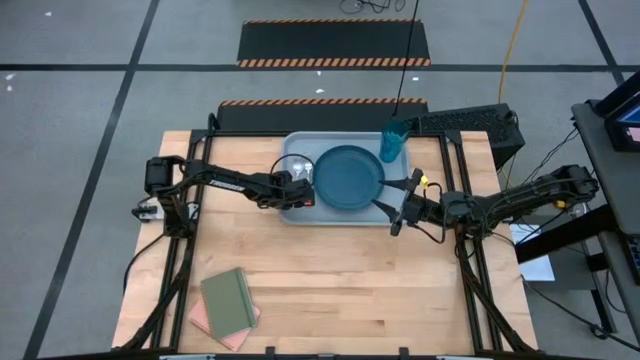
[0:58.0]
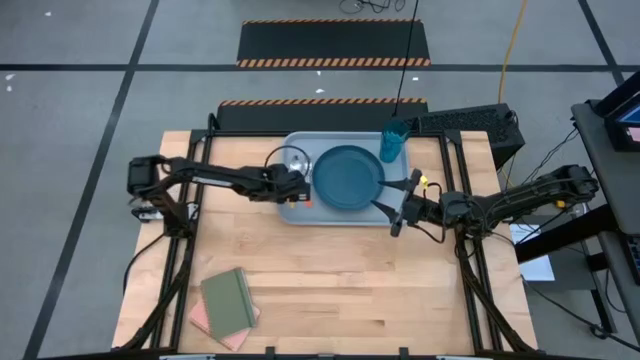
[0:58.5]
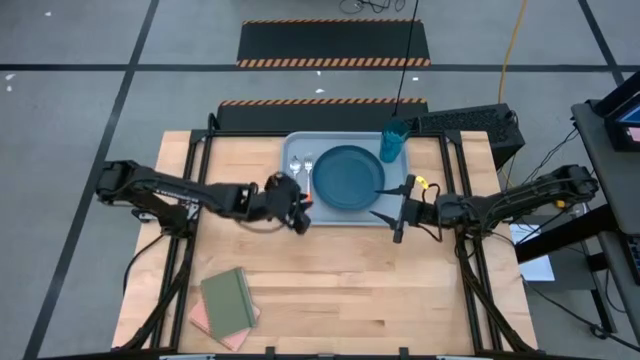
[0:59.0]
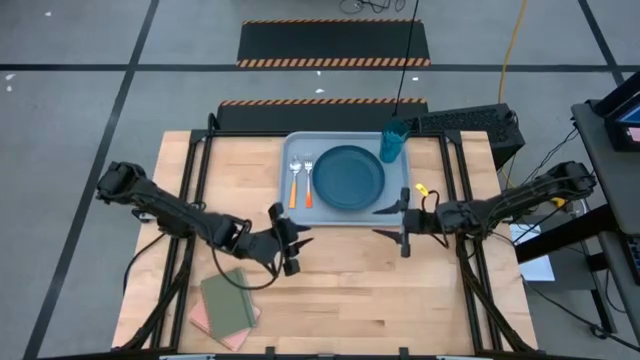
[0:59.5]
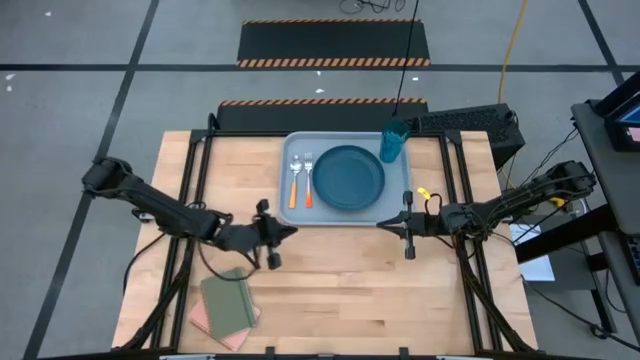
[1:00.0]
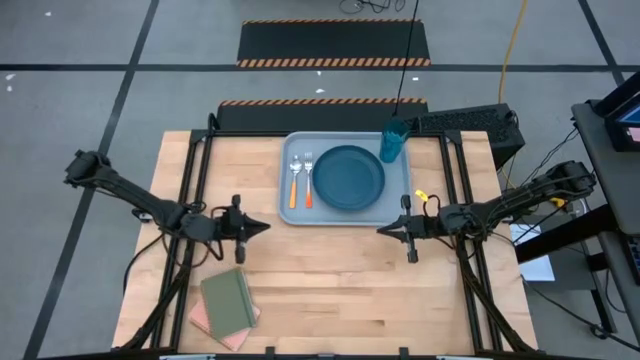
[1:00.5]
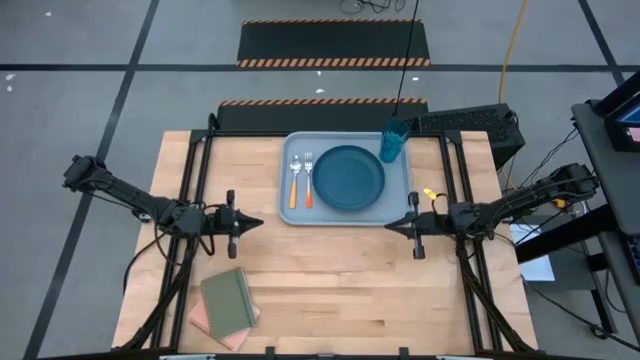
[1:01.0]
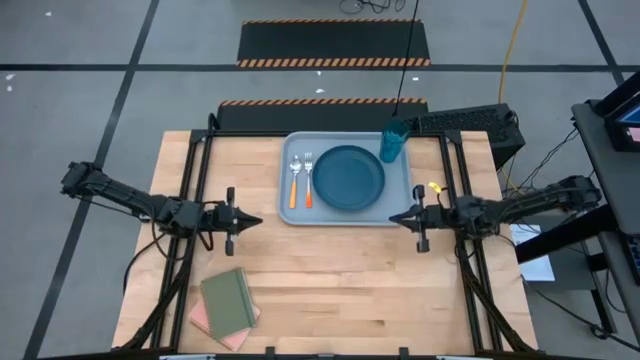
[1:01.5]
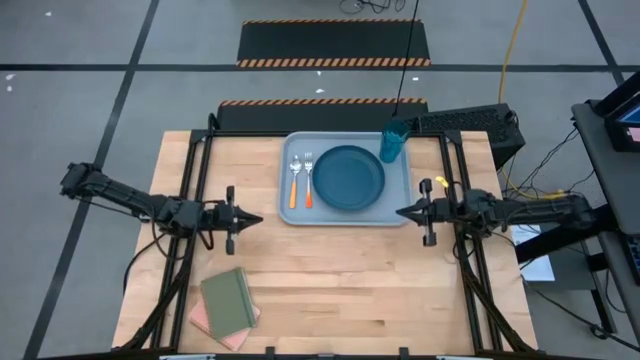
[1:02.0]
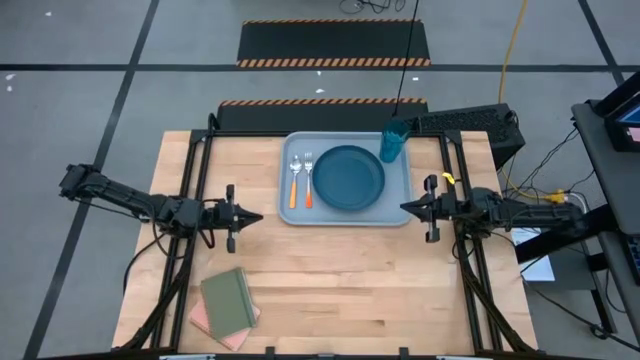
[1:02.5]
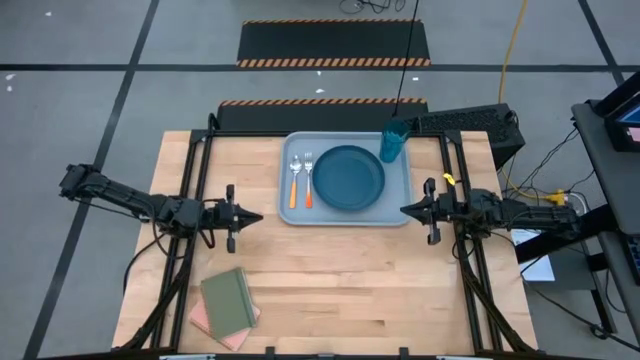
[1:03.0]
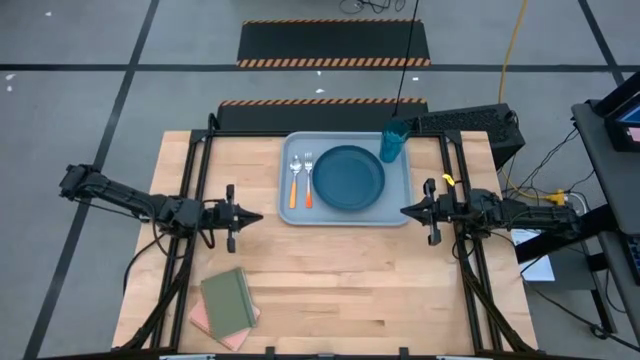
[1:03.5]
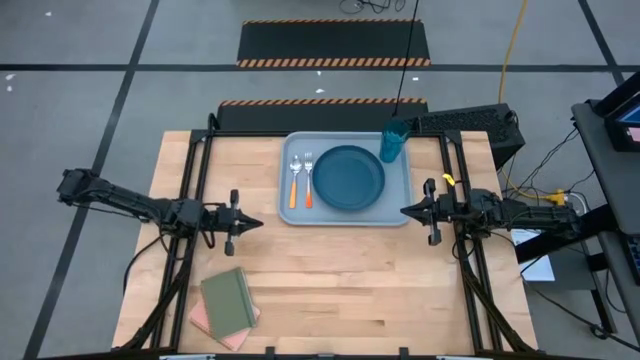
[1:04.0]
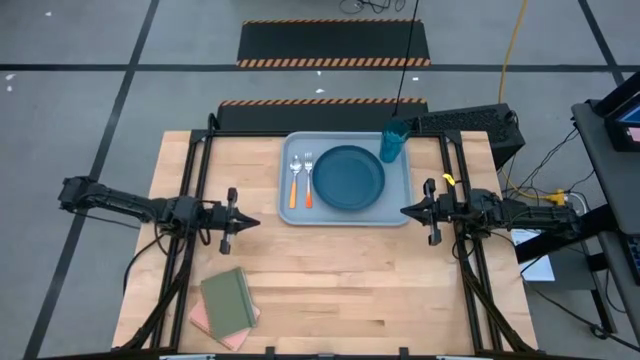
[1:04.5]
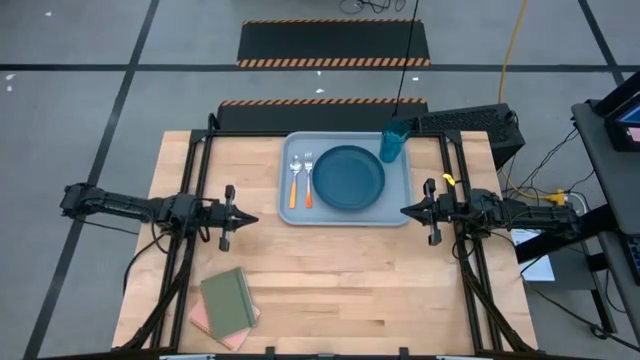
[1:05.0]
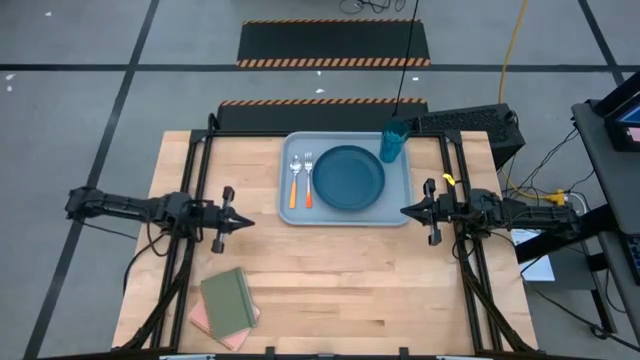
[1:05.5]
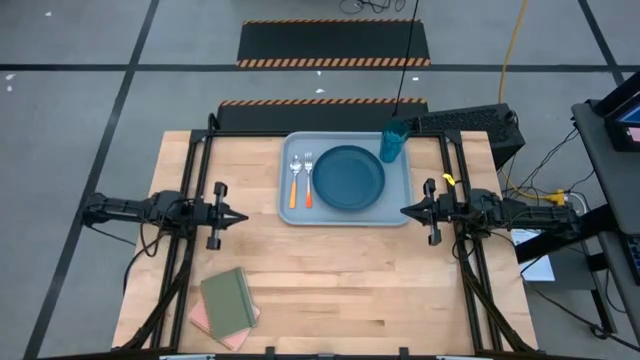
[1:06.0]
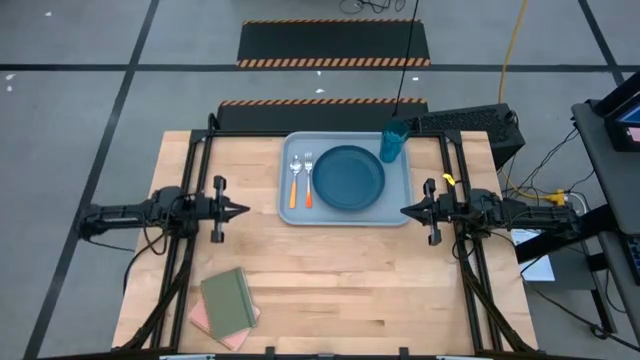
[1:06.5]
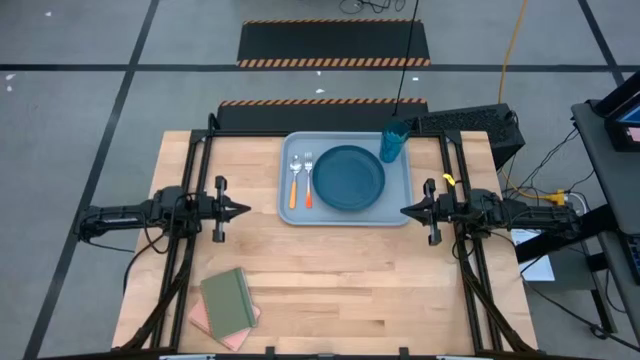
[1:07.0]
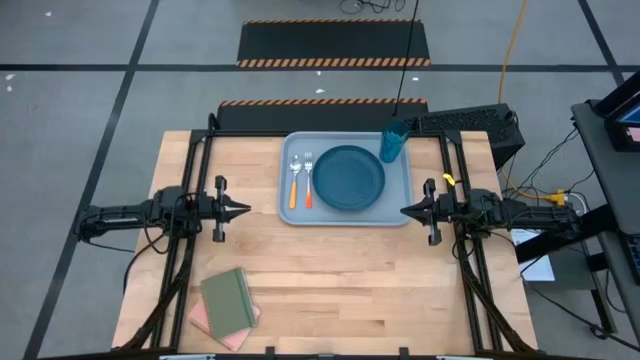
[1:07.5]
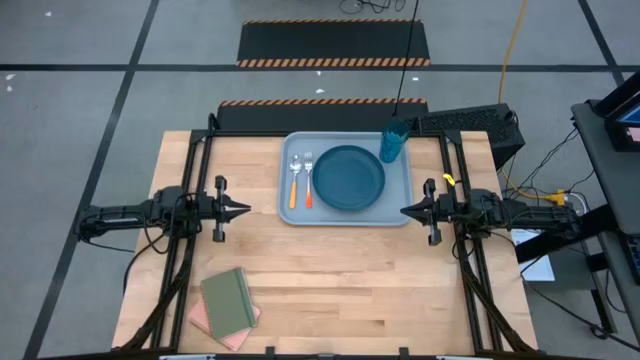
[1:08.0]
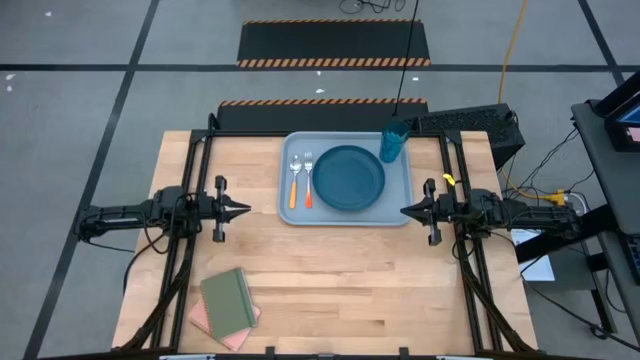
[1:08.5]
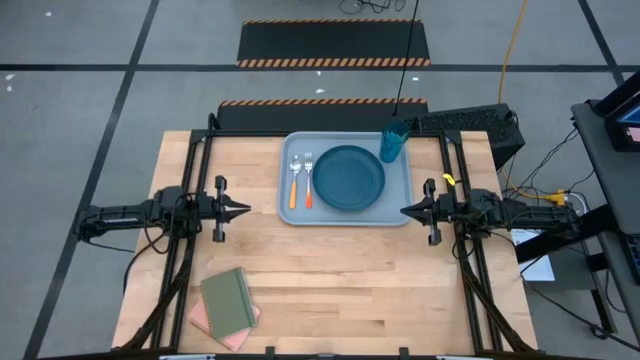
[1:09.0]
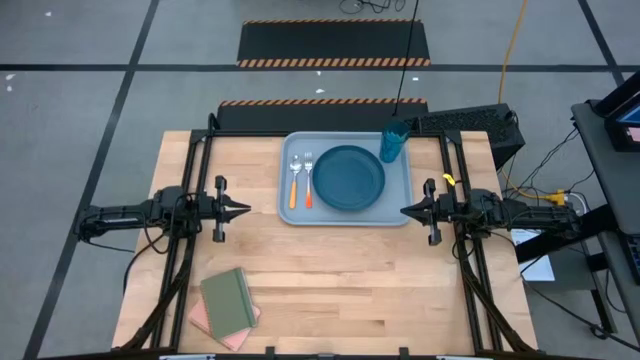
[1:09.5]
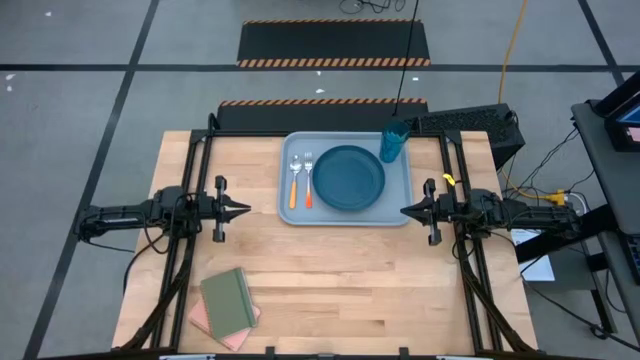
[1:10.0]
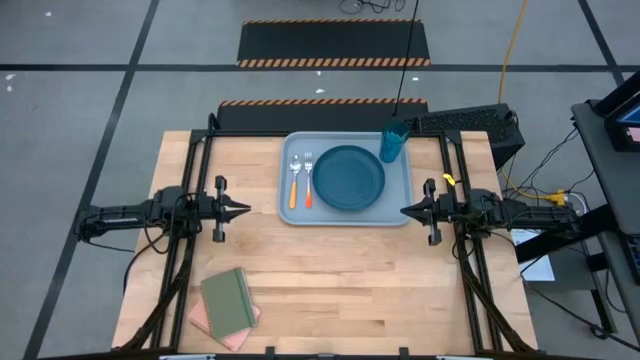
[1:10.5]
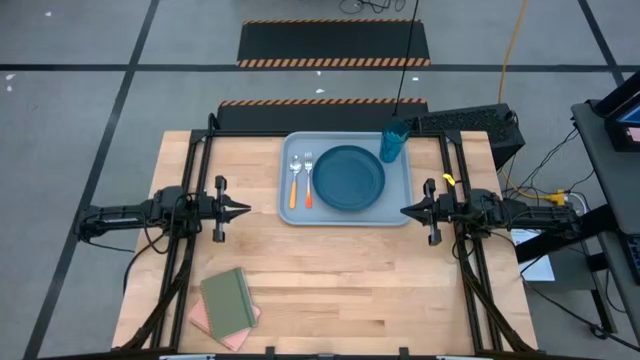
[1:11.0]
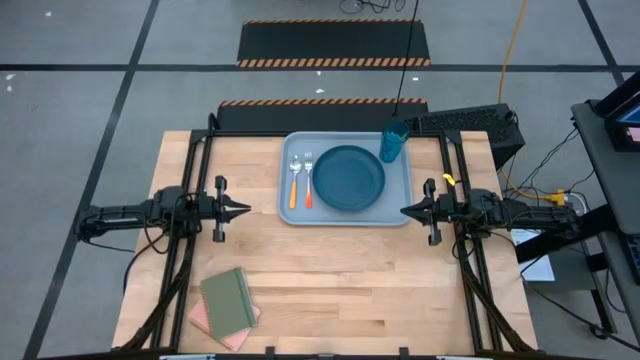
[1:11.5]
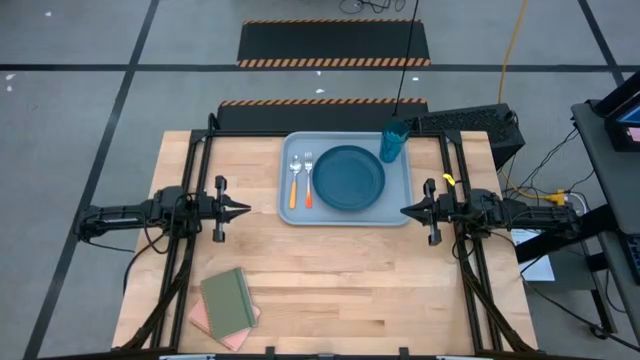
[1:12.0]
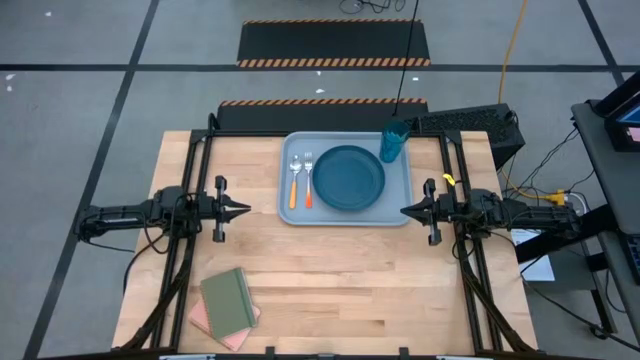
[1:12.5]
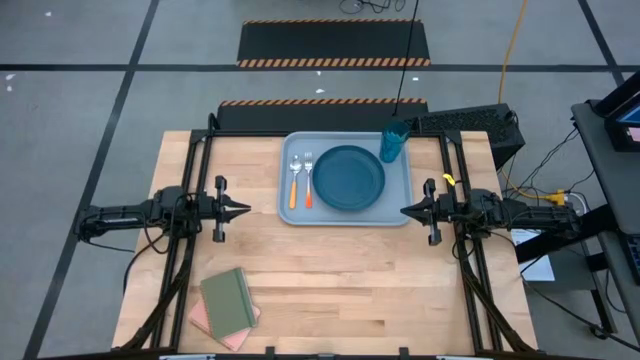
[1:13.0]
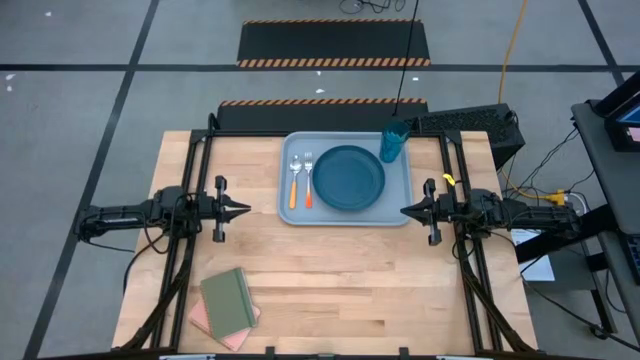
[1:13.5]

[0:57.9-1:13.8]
Task: Pick and place plate/cup/fork/spoon on tray
Return to Home Position

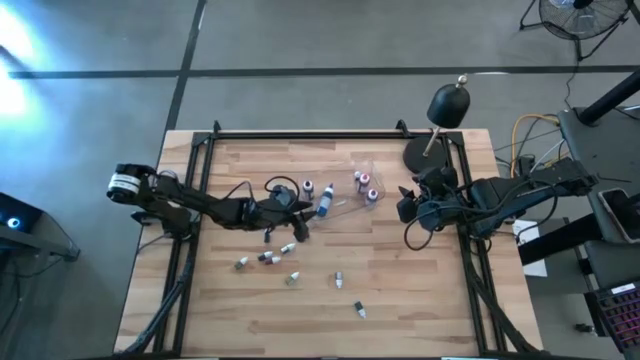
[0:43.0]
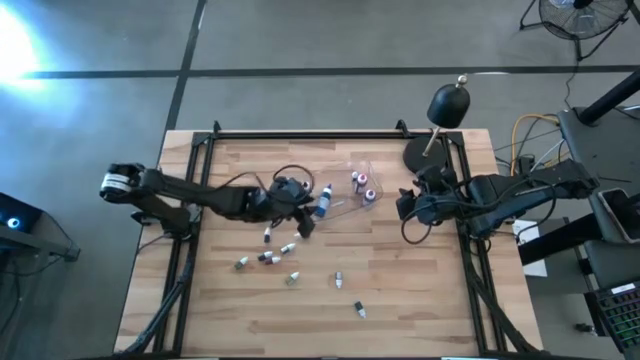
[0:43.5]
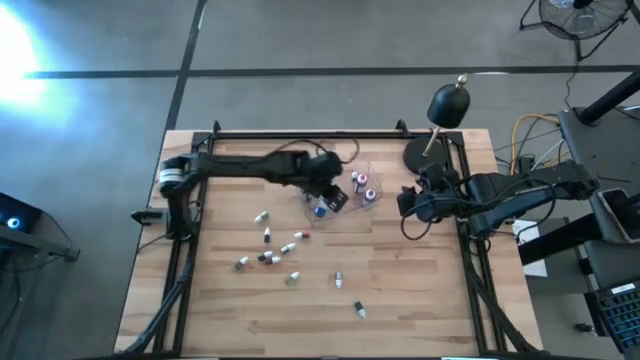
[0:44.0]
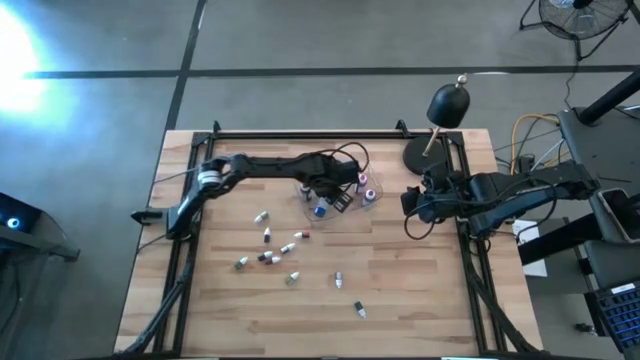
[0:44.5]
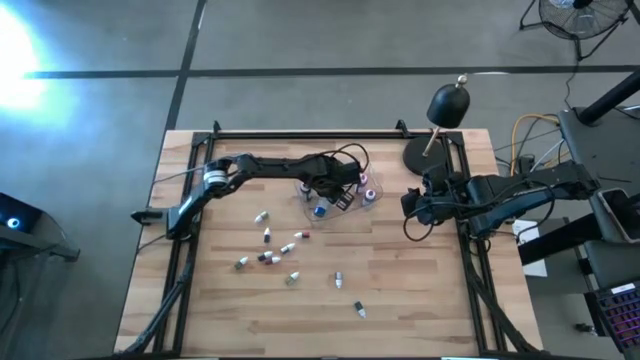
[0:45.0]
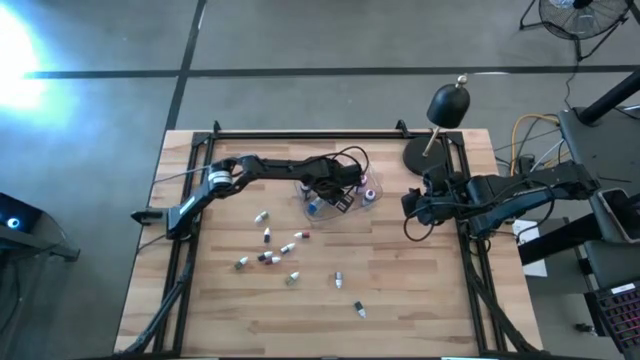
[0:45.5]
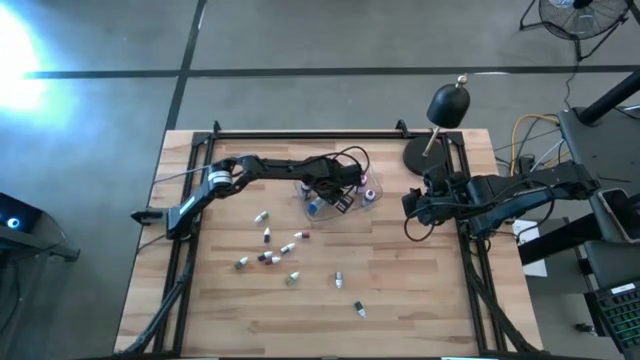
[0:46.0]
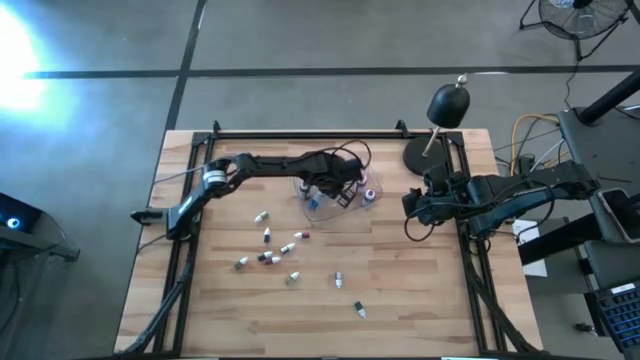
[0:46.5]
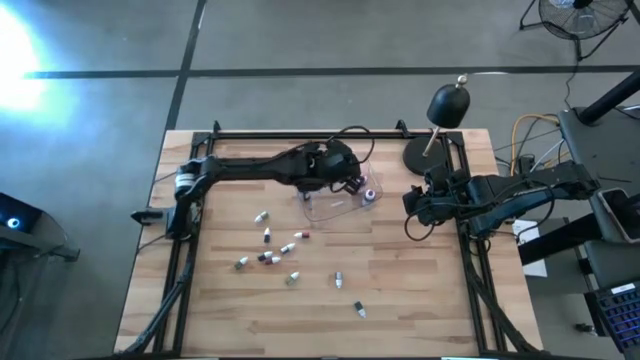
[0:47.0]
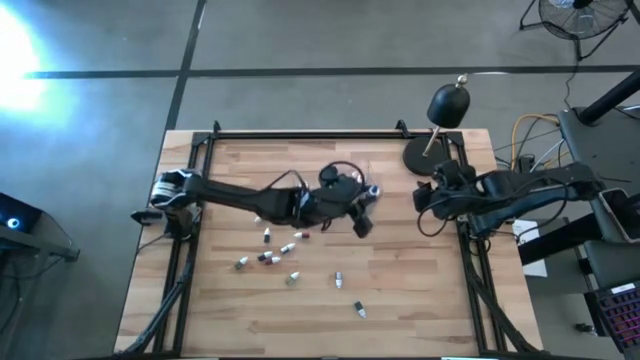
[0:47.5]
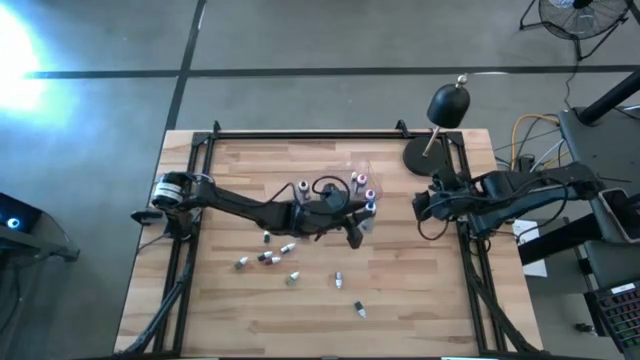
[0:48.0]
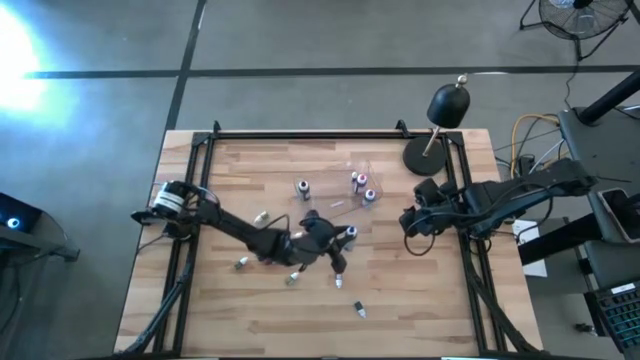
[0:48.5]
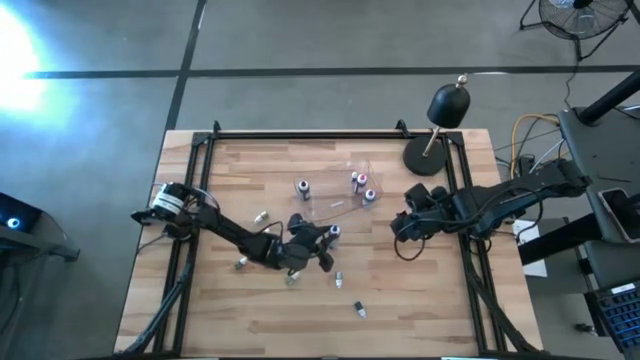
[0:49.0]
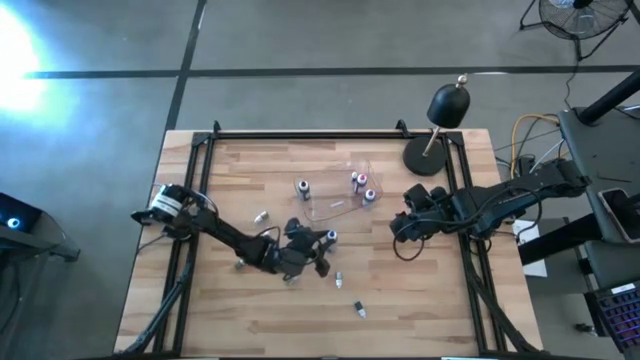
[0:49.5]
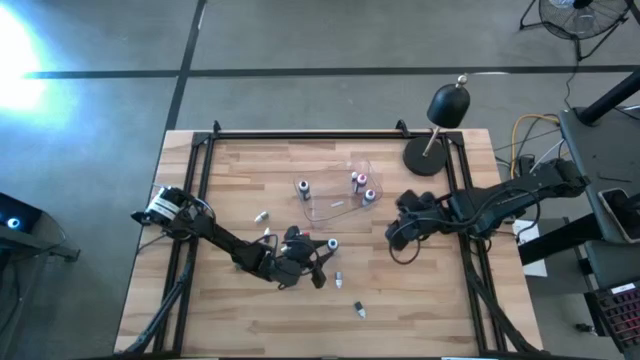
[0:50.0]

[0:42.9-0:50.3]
Task: Pick & Place food coloring
Remove the big blue food coloring bottle from the transparent bin
